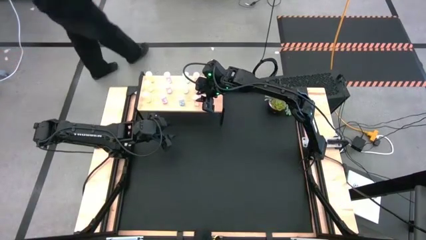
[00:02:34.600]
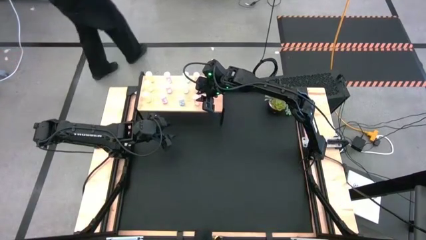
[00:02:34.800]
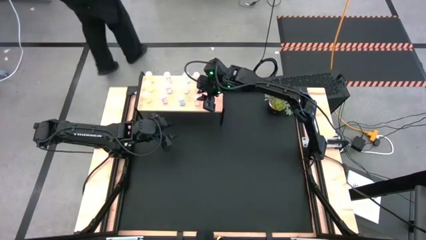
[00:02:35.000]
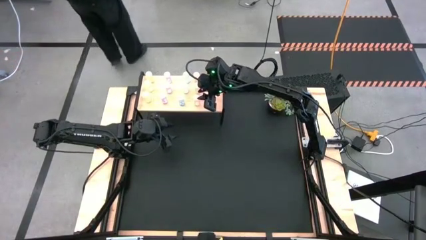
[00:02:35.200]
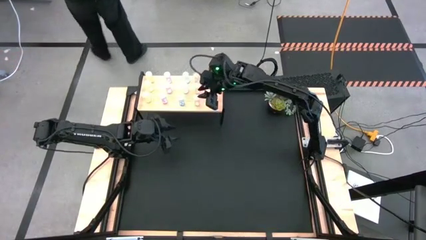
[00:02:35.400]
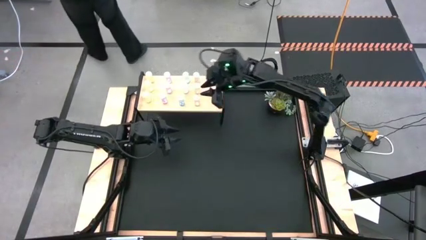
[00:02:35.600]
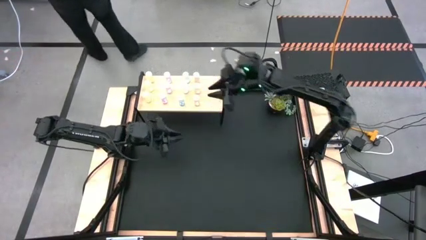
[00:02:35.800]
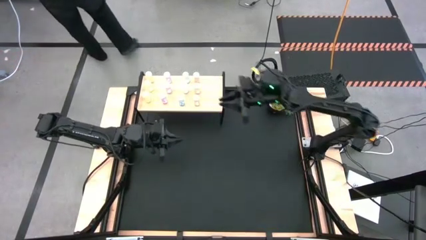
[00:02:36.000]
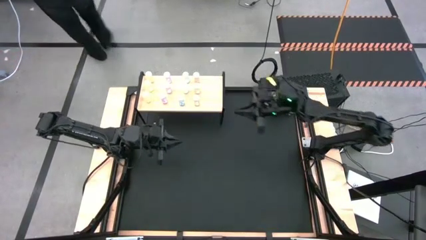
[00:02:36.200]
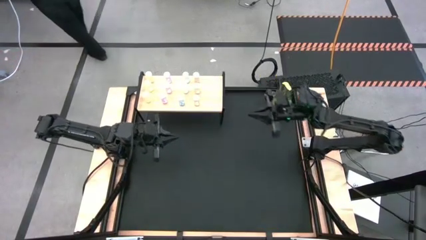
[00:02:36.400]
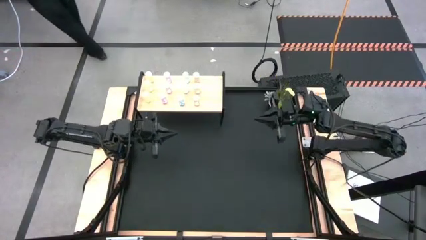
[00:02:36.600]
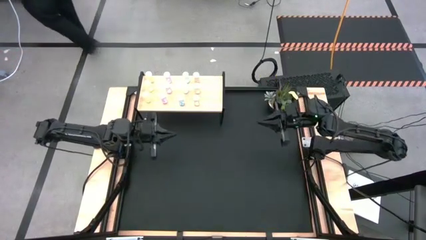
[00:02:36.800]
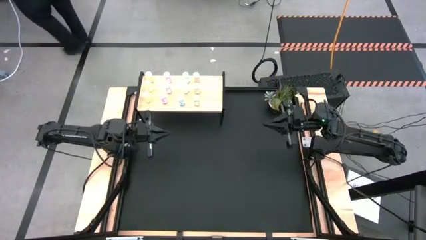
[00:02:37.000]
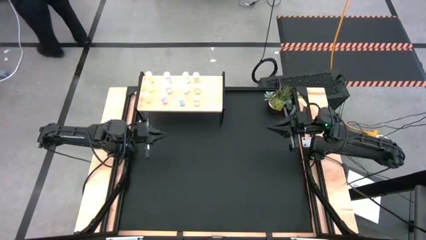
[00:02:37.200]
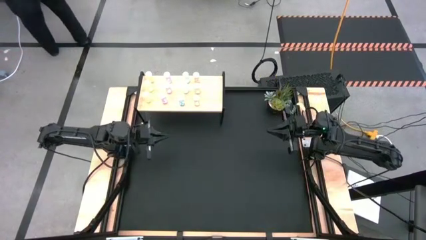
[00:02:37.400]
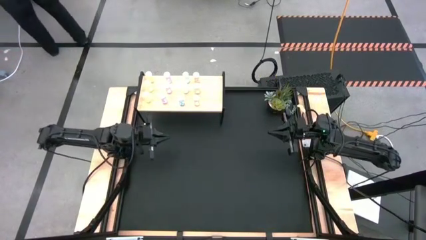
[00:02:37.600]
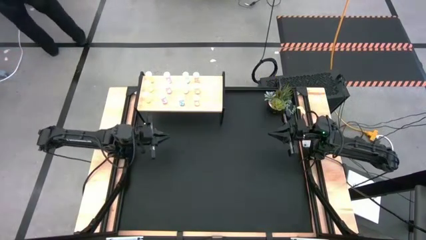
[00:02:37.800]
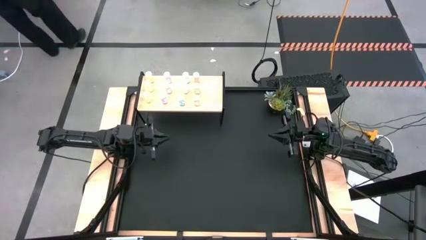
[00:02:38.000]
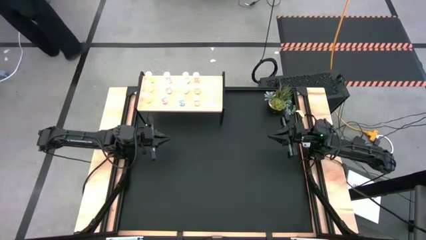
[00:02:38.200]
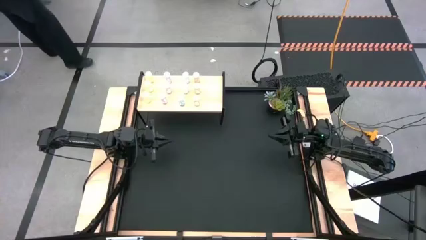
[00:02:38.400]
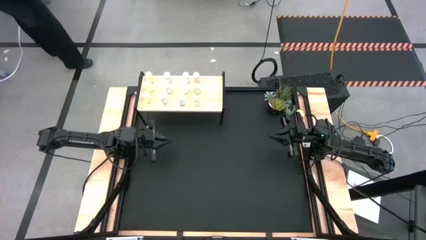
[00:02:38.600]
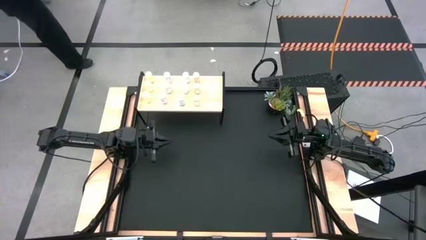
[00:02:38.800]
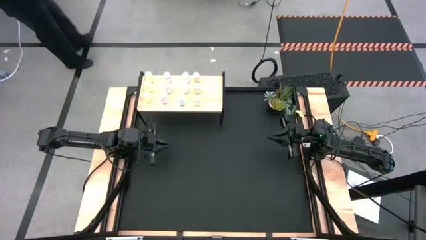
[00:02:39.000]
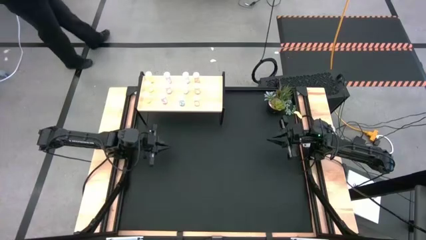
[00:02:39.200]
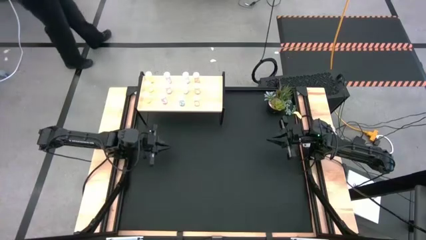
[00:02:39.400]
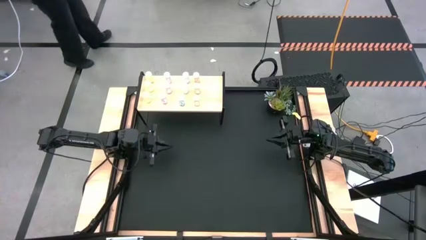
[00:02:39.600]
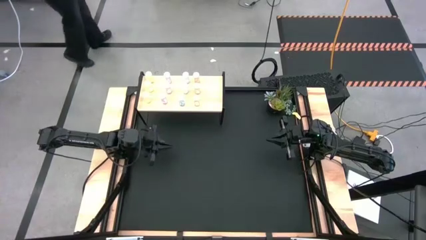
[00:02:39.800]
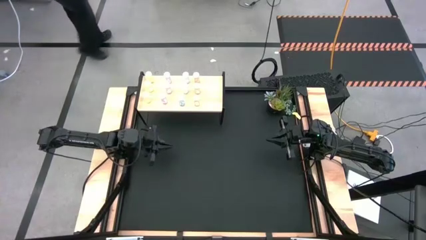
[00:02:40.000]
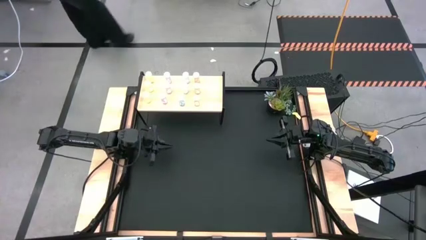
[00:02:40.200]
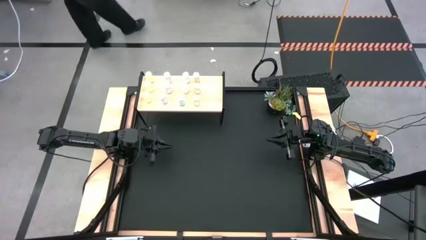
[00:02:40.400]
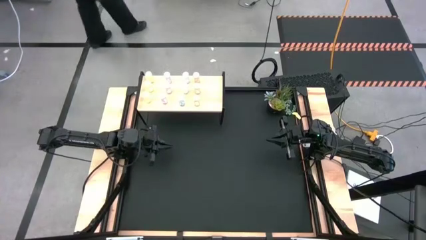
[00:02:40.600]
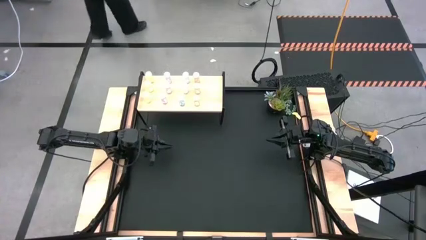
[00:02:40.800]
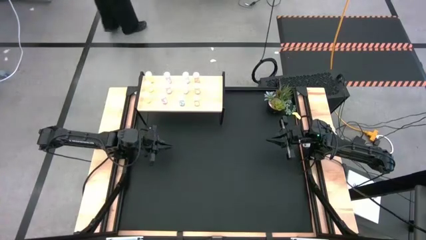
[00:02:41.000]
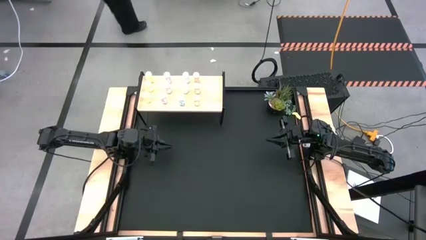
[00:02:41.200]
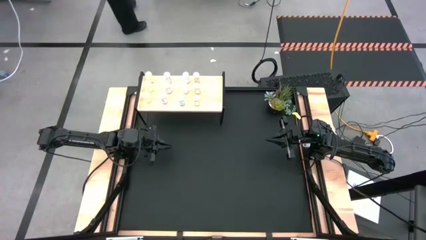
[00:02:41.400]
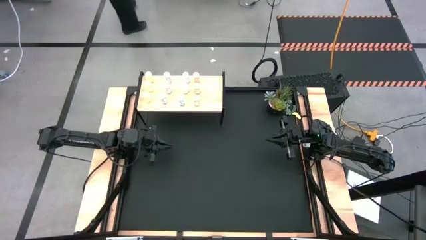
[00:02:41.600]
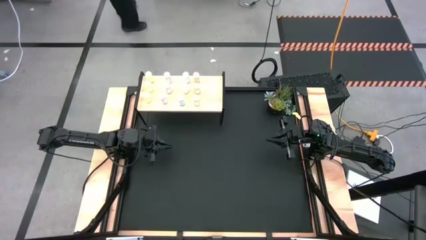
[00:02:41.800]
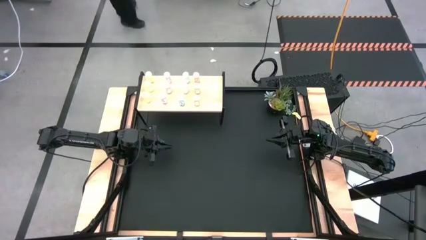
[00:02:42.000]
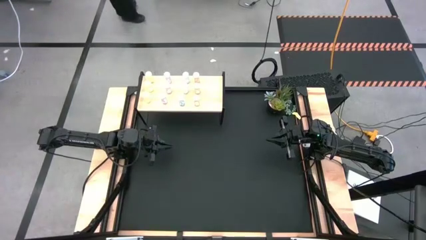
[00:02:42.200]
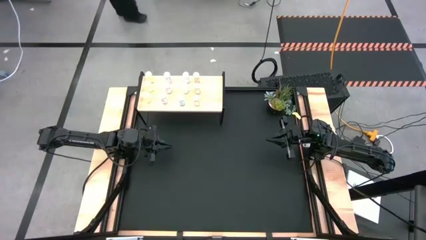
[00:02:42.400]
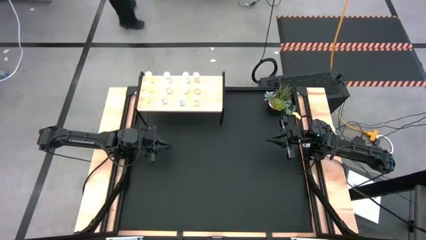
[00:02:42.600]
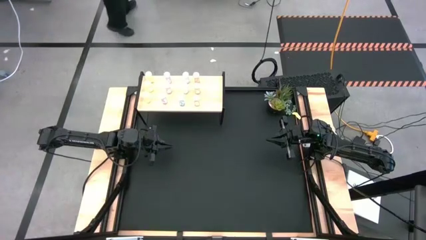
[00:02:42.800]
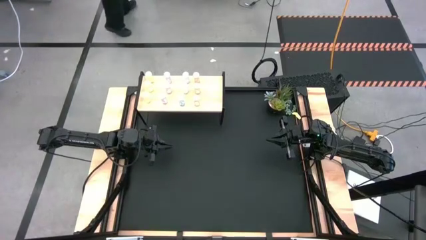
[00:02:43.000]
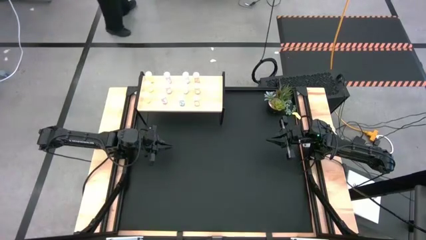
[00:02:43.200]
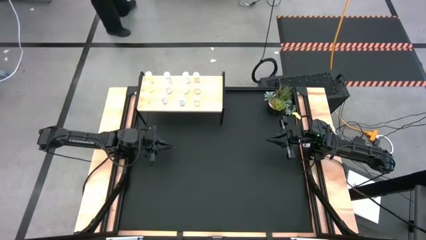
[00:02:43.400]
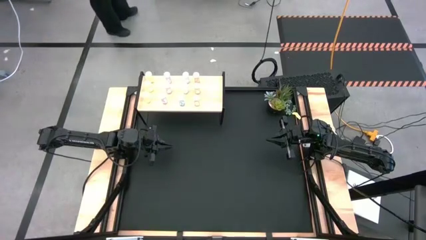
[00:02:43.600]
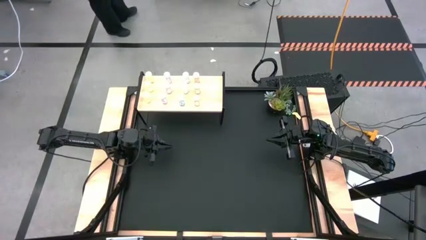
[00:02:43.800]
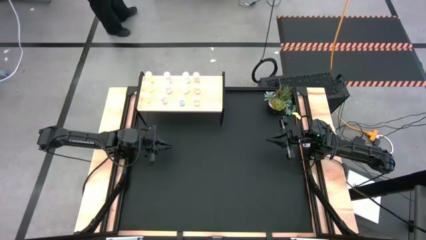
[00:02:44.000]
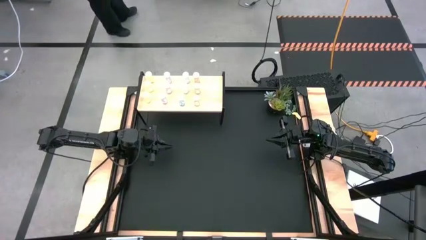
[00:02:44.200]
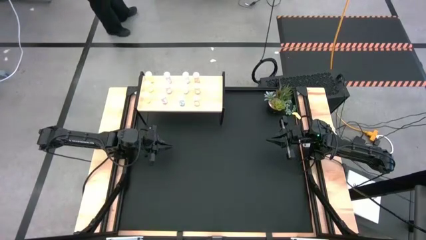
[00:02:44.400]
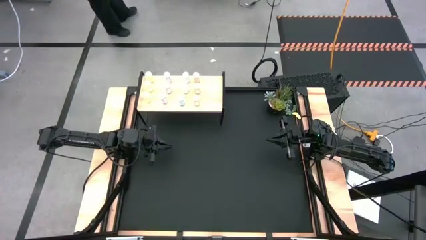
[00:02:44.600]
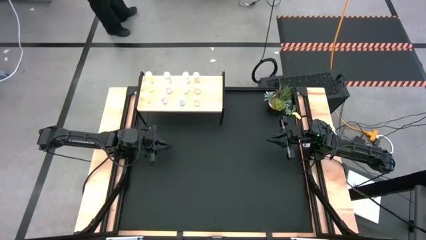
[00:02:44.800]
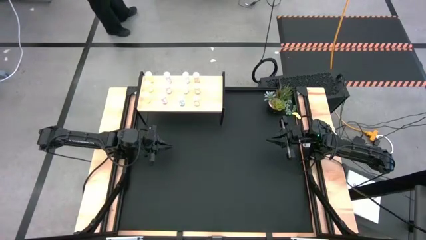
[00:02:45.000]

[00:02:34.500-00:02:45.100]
Task: Pick and place medicine bottles onto shelf by color
Return to Home Position
